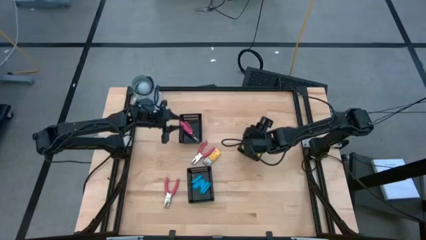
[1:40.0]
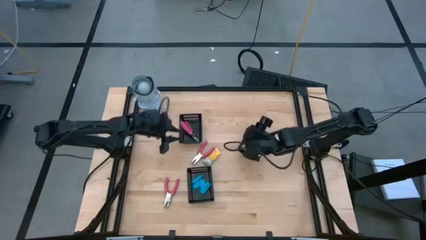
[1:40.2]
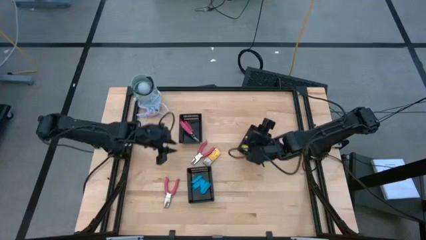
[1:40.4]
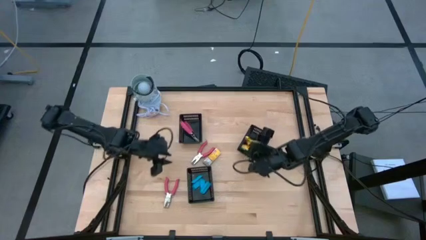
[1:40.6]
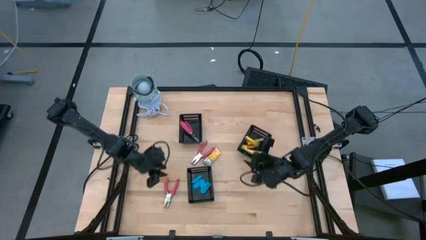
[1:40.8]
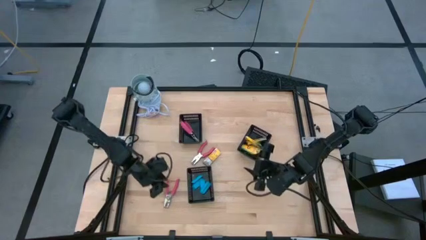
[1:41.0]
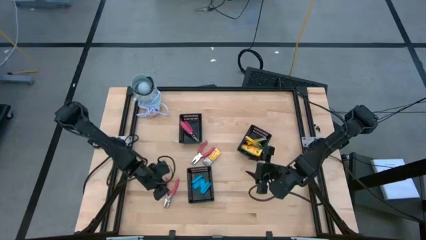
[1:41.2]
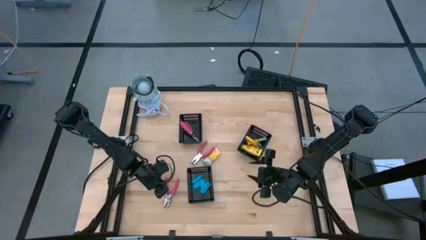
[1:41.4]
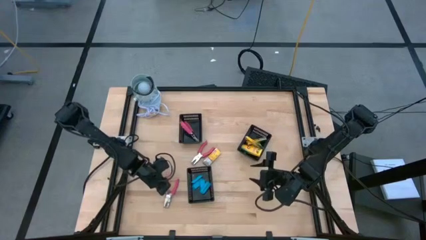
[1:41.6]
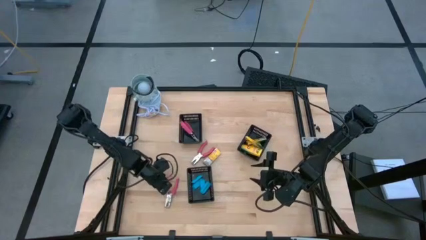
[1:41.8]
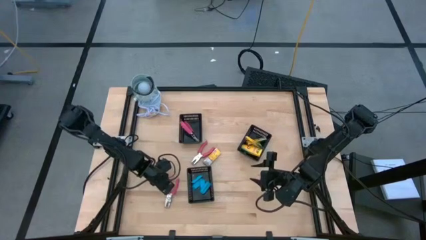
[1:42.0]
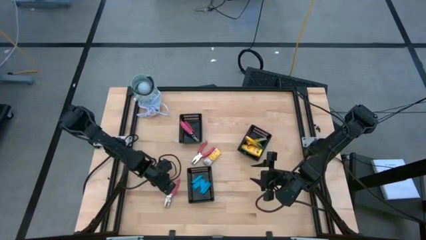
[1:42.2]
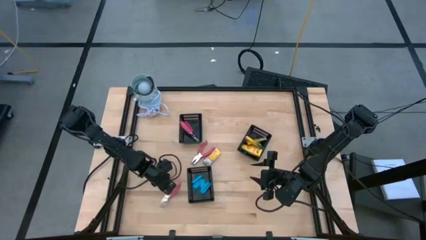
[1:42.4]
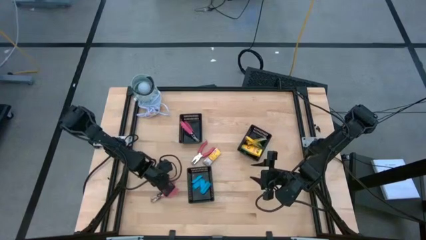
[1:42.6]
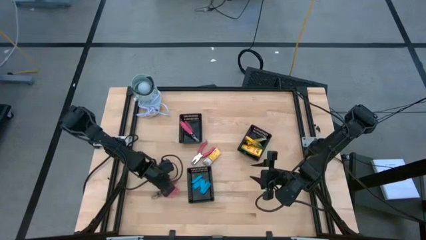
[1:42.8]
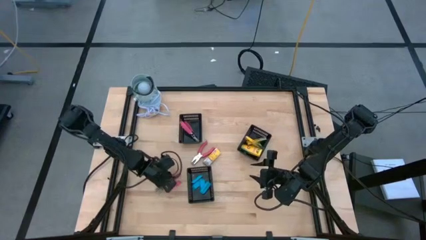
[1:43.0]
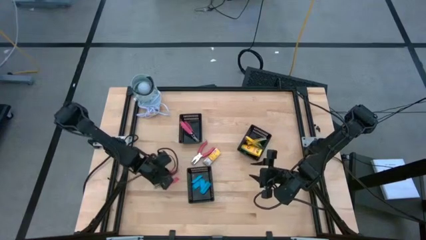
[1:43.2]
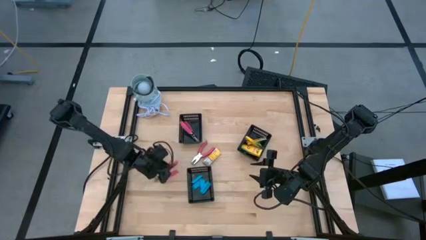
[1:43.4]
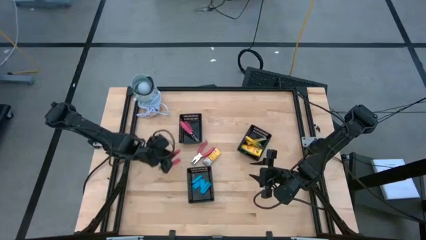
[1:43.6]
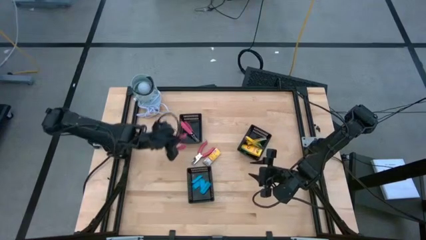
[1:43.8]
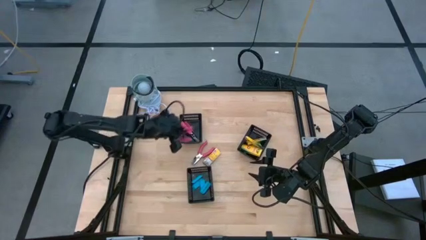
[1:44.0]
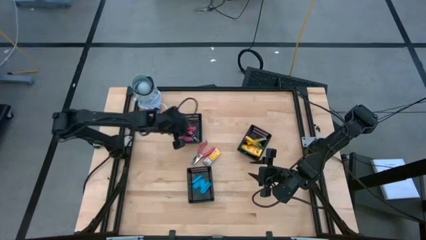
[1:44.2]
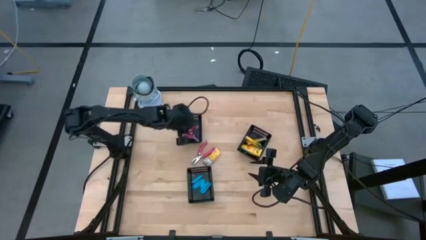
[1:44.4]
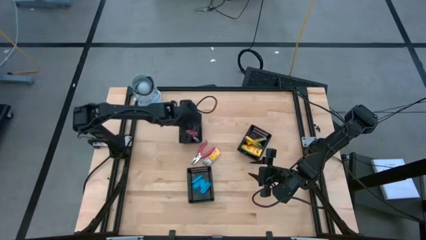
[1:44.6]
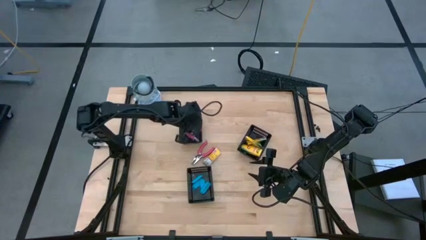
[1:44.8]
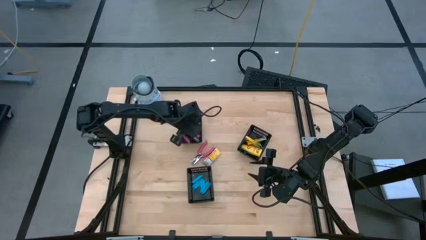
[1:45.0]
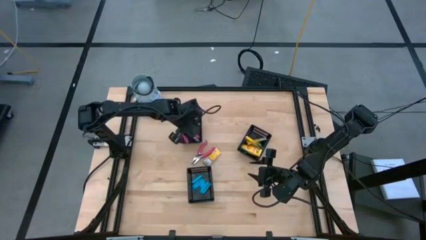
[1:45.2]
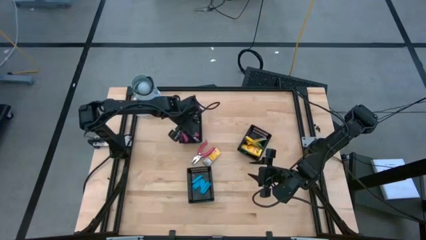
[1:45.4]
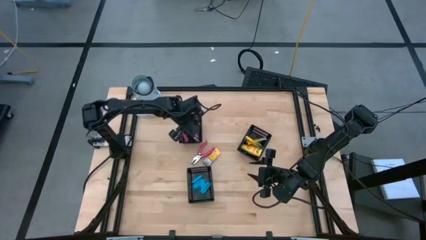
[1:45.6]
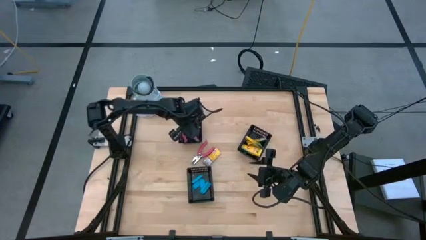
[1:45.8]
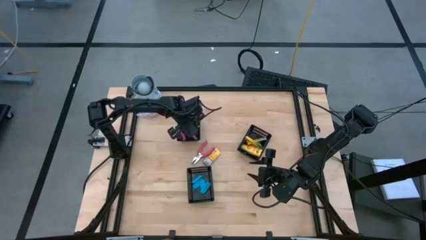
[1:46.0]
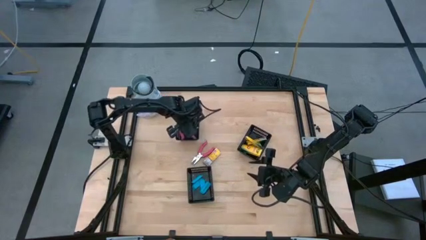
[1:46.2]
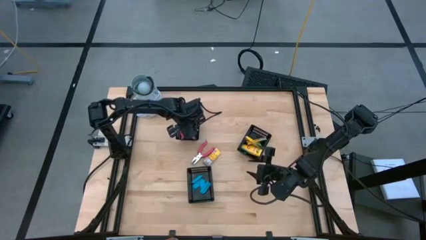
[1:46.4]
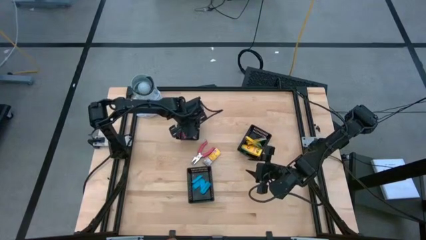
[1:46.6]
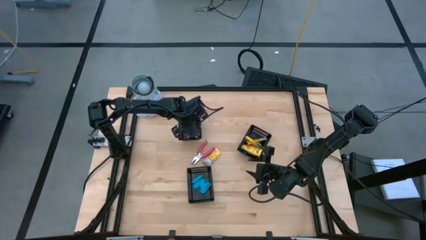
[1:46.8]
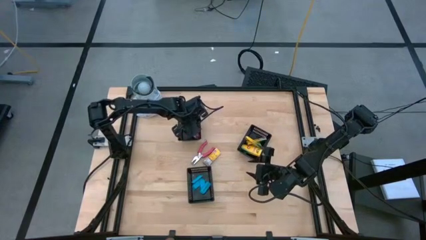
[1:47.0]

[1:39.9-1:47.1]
Task: Pick & Place School Supplies
Put the pink puncher into the top left black basket

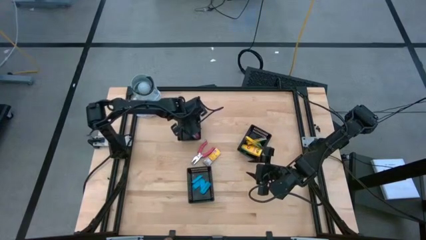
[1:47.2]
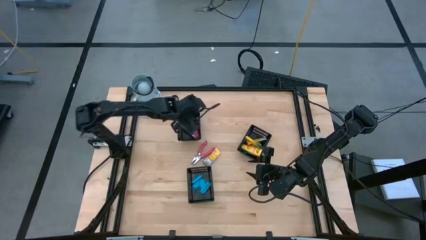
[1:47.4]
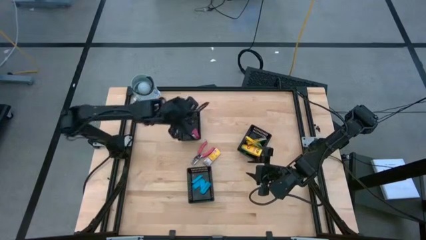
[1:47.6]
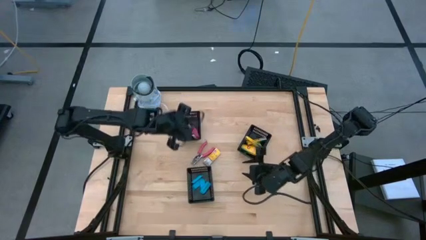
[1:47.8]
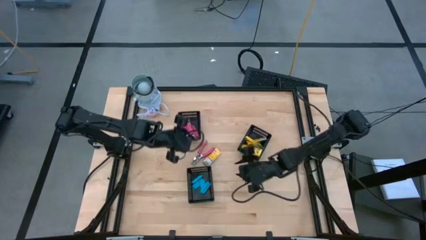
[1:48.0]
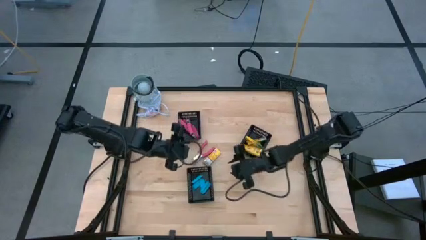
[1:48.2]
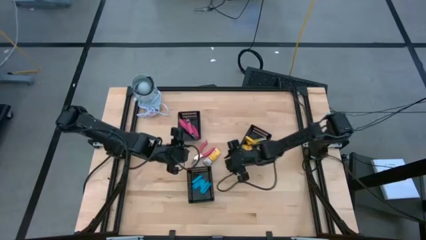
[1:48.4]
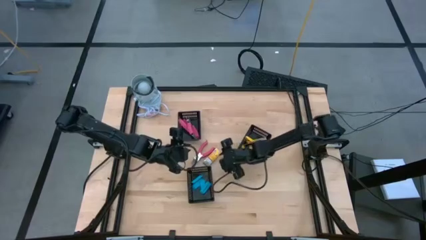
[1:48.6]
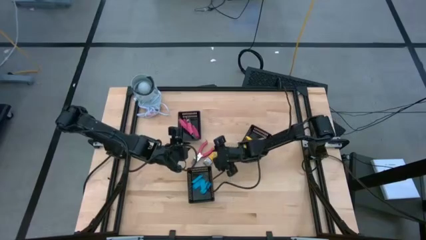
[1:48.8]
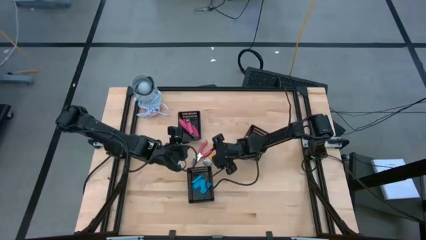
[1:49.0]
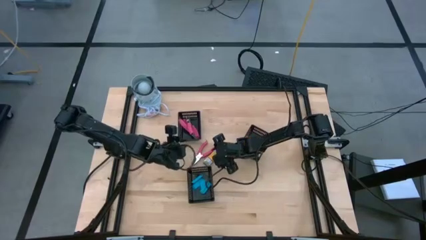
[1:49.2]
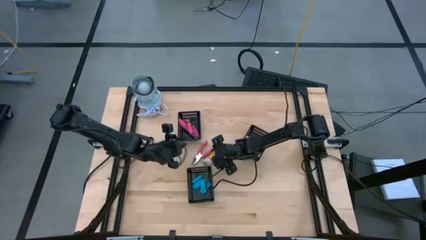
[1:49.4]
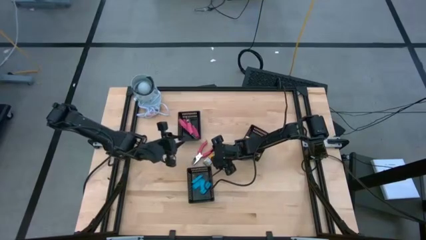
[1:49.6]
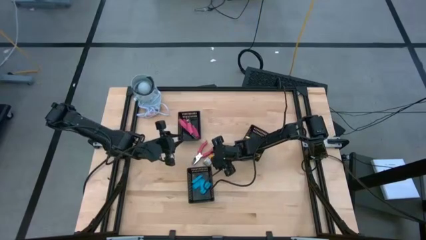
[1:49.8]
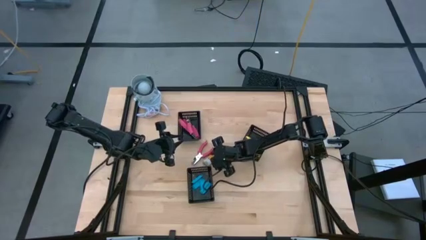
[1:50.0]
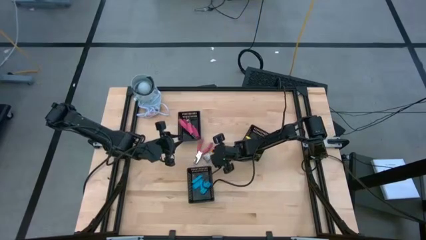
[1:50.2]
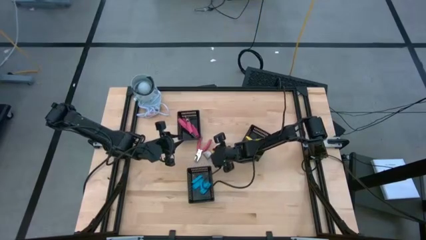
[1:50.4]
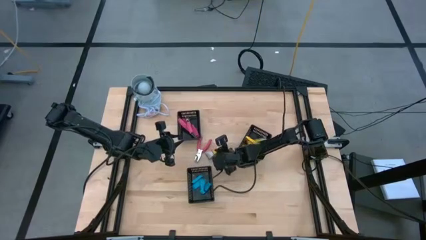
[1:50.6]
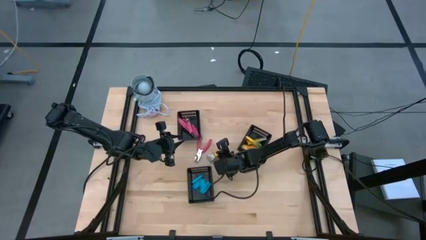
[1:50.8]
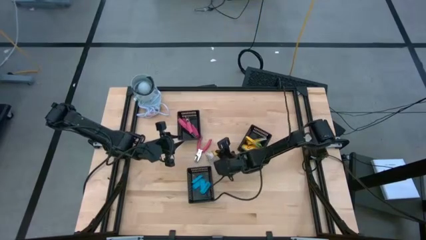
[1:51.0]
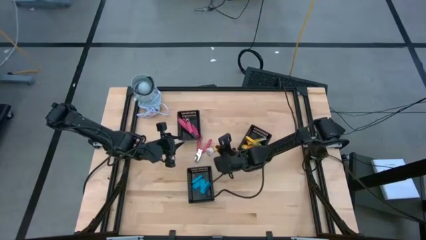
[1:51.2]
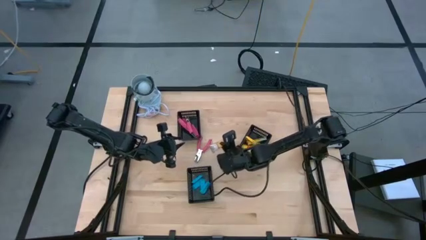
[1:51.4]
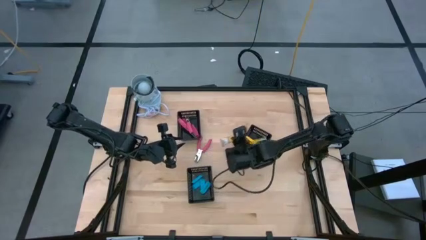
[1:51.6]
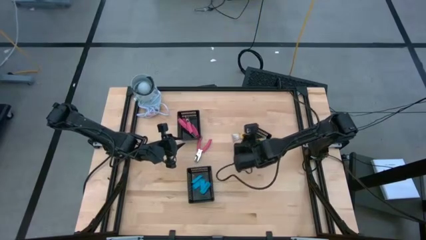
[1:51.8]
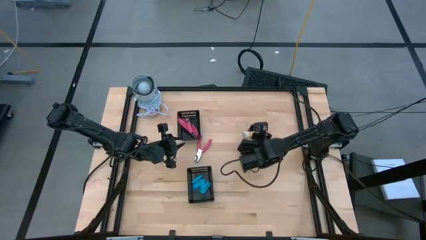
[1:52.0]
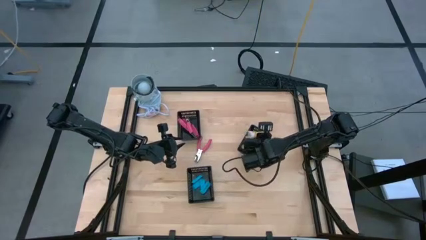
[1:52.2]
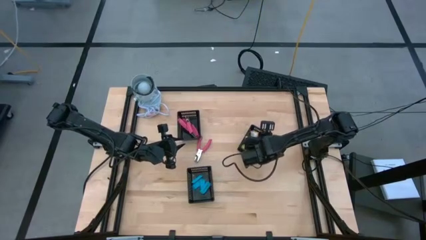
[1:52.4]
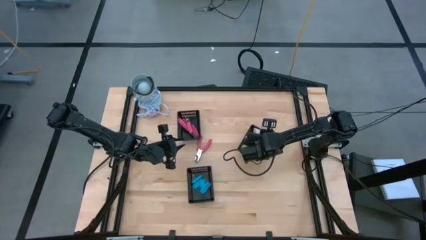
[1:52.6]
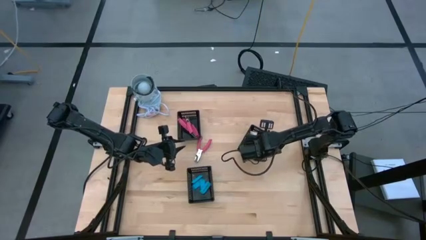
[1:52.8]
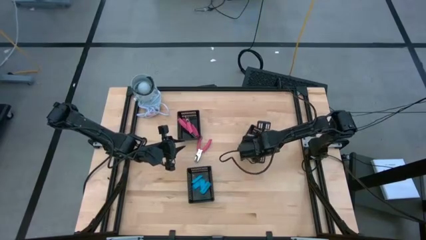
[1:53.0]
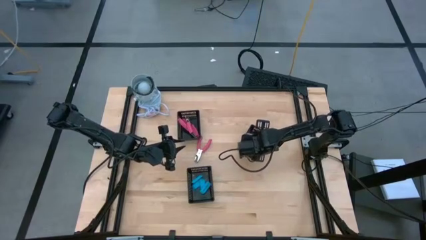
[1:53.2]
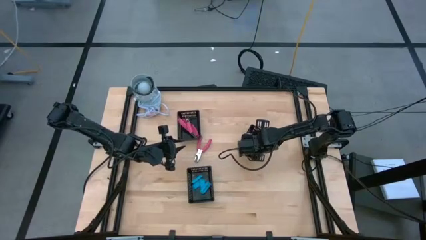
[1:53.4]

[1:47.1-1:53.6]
Put the yellow crayon box into the right black basket

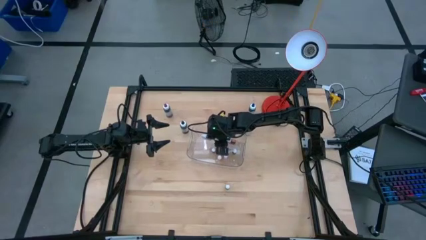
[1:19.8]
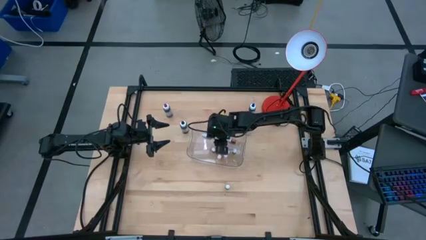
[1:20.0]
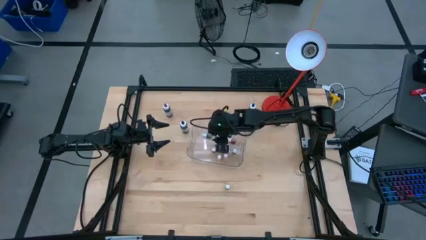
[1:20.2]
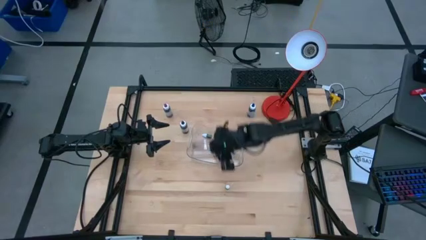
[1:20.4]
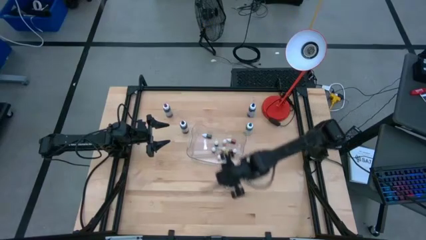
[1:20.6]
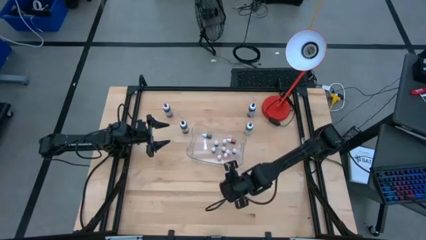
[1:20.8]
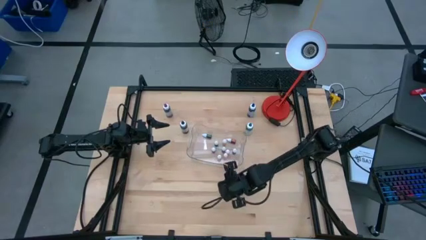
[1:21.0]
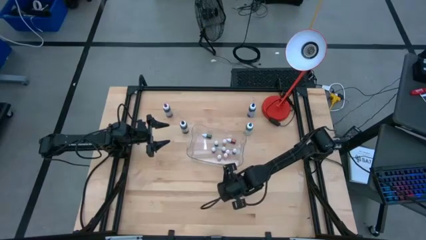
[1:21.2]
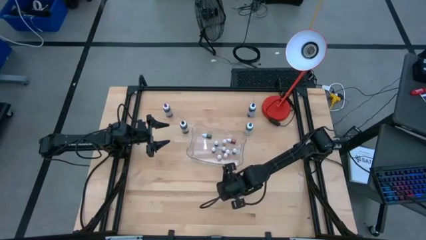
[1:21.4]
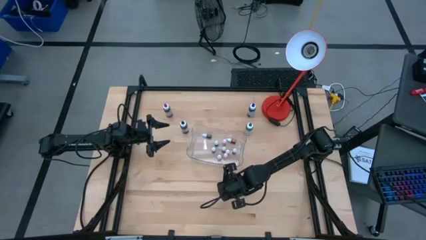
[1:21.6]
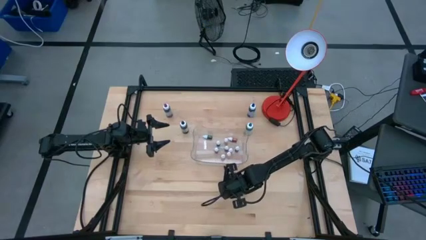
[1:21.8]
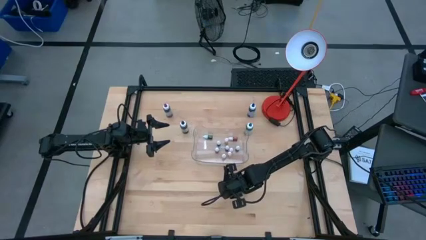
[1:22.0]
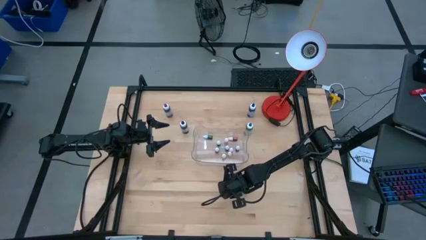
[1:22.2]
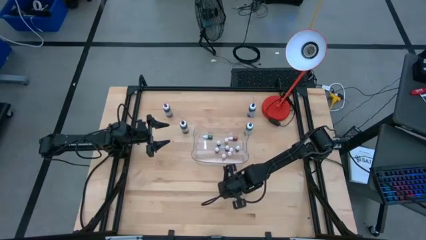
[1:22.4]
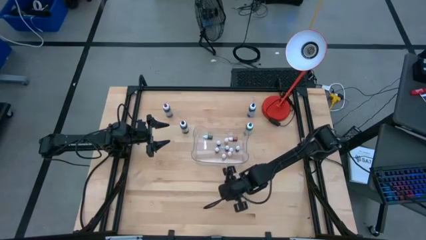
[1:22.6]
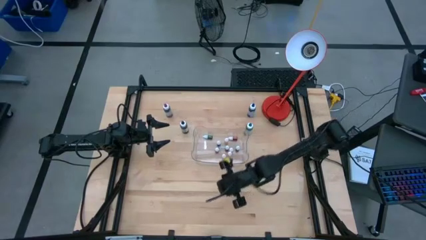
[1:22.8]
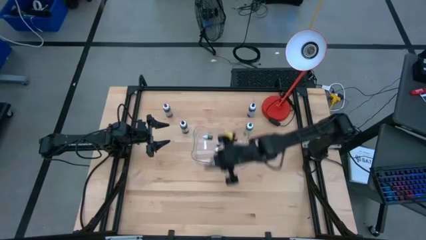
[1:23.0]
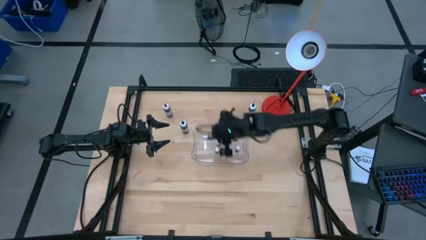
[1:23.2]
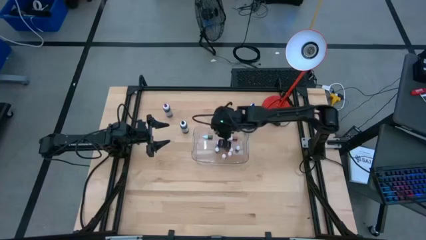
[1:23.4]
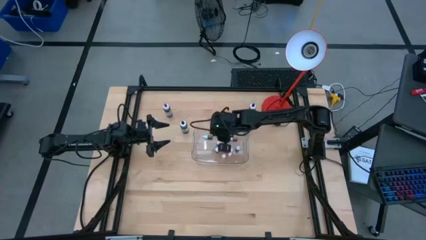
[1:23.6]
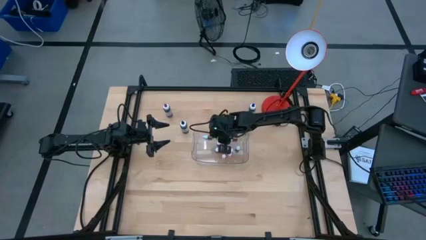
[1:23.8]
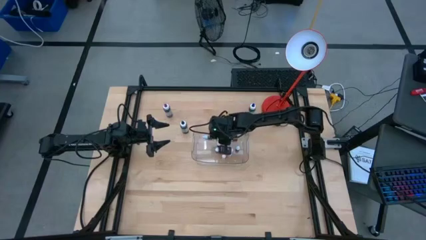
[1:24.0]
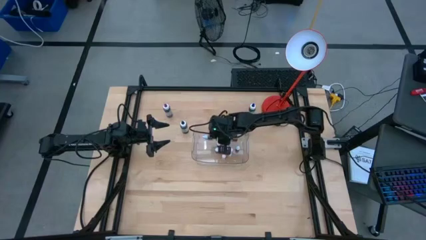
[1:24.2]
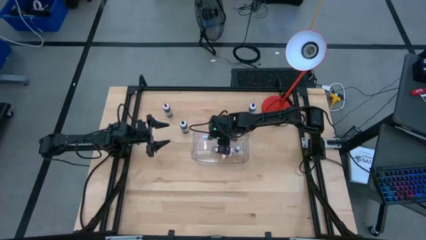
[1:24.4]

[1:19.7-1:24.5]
Task: Pick & Place food coloring
Put the small black food coloring bottle into the transparent bin
